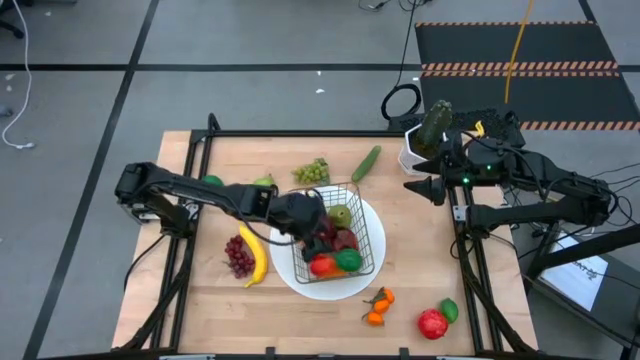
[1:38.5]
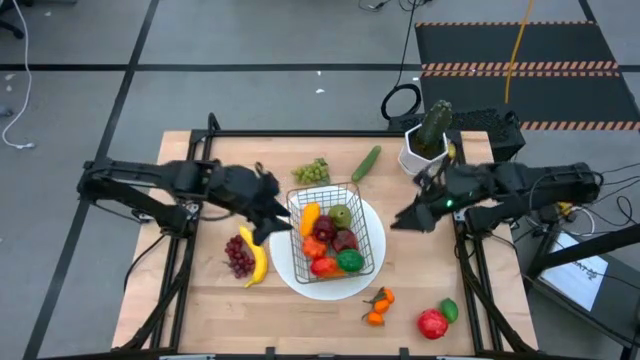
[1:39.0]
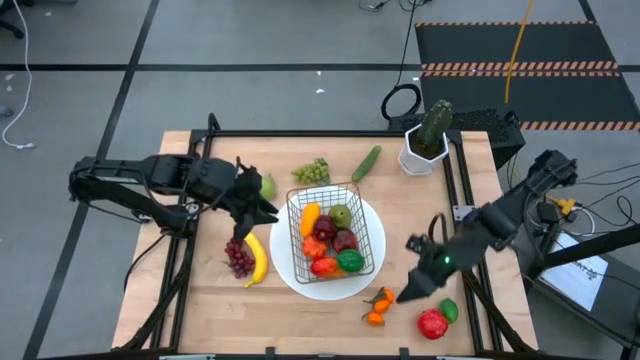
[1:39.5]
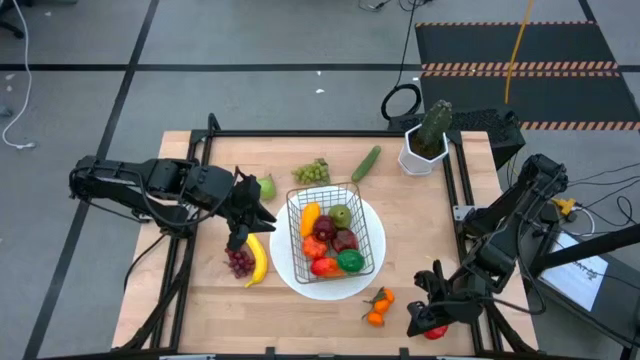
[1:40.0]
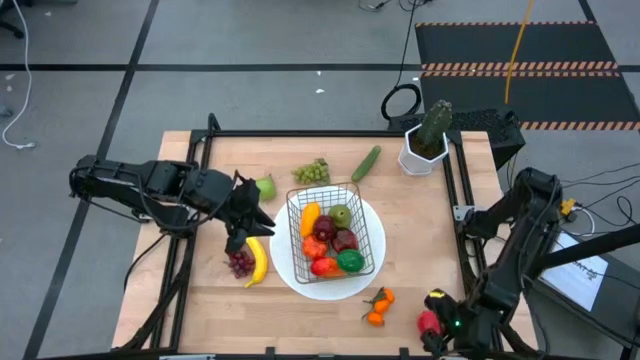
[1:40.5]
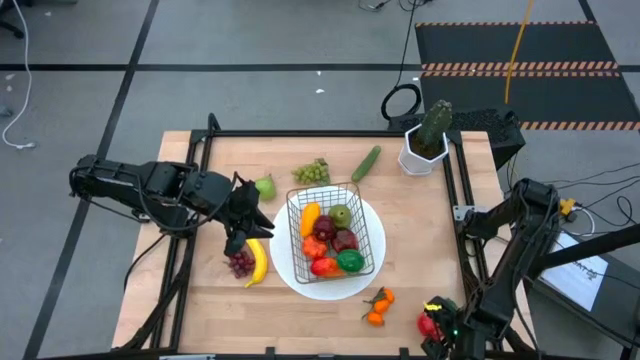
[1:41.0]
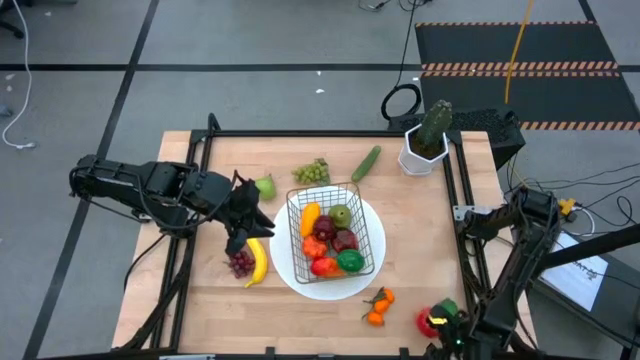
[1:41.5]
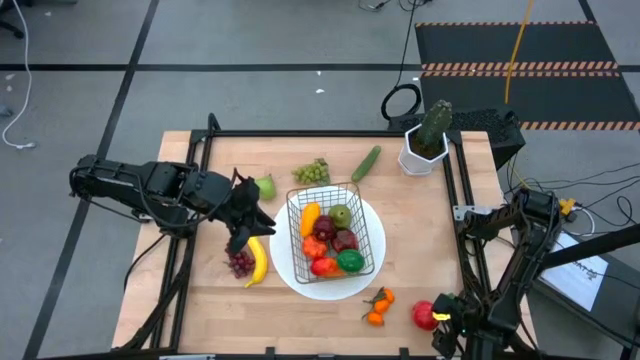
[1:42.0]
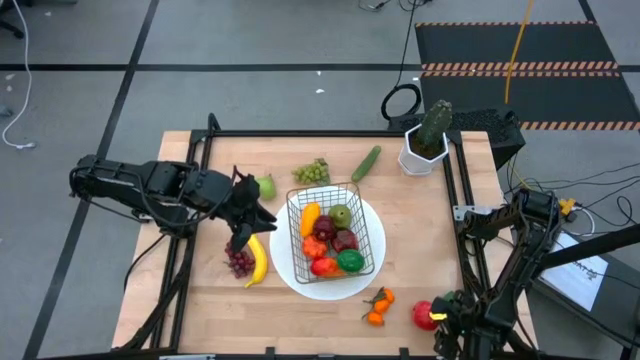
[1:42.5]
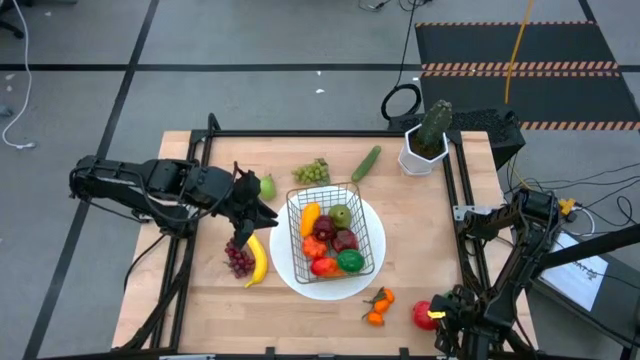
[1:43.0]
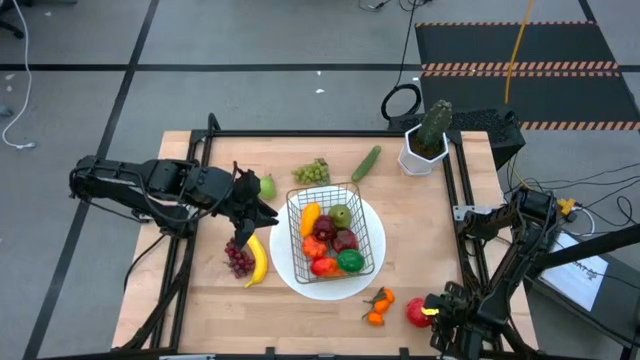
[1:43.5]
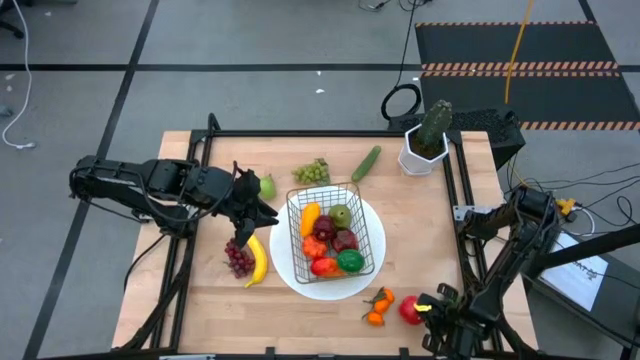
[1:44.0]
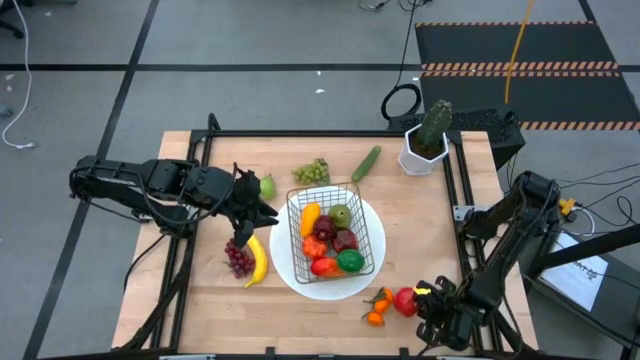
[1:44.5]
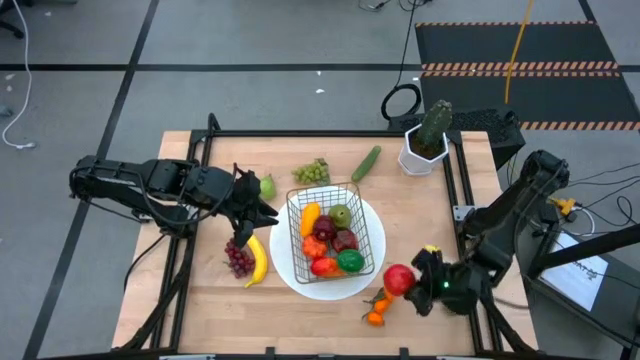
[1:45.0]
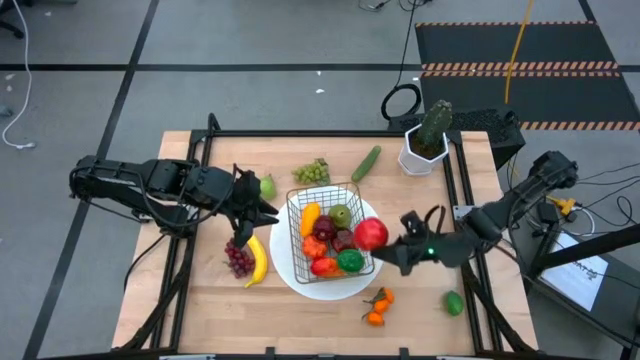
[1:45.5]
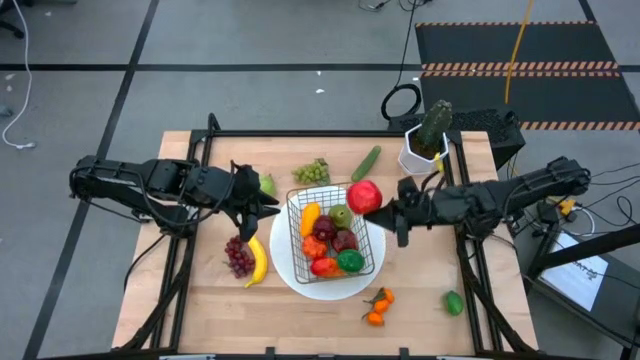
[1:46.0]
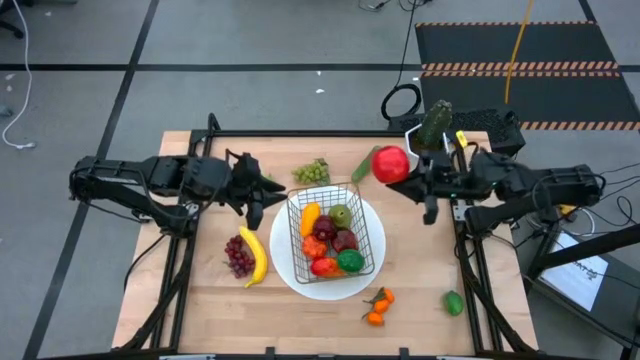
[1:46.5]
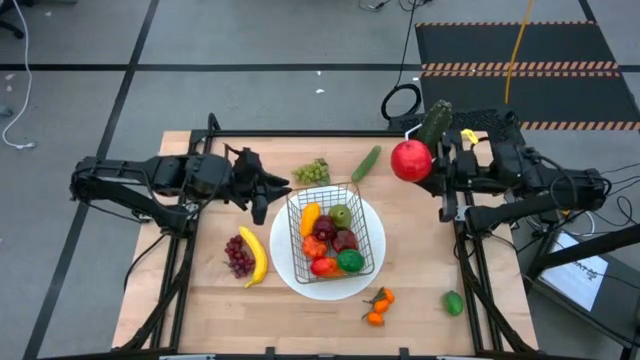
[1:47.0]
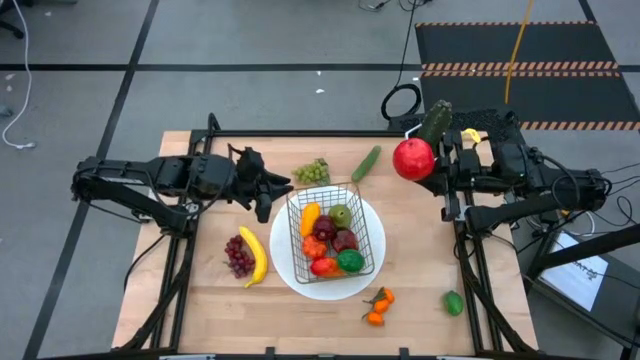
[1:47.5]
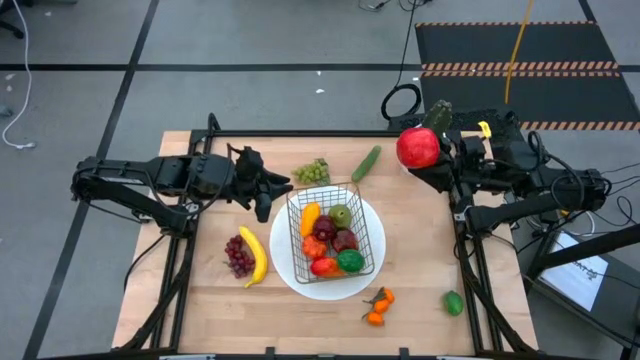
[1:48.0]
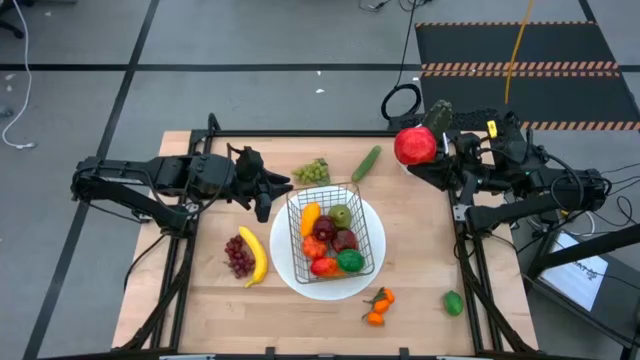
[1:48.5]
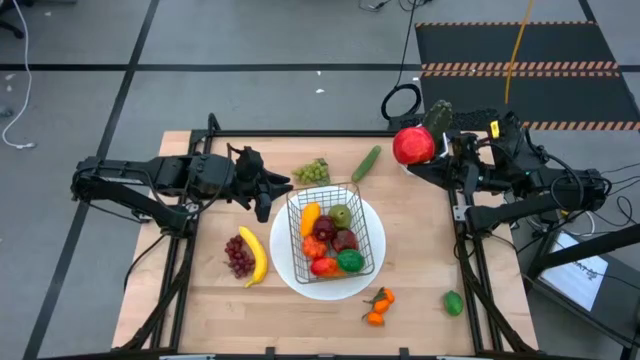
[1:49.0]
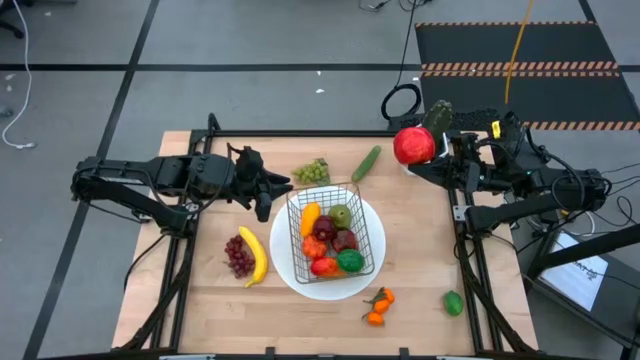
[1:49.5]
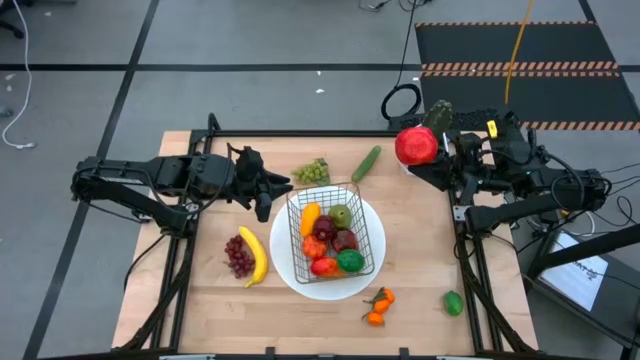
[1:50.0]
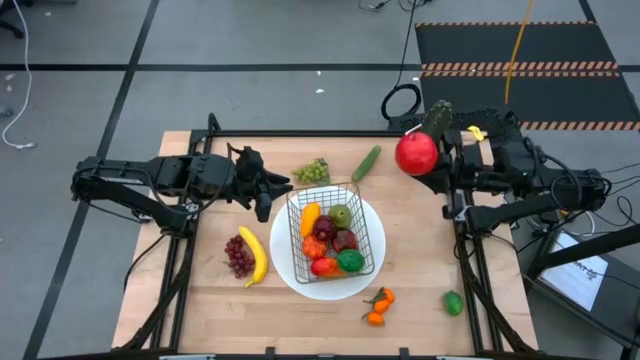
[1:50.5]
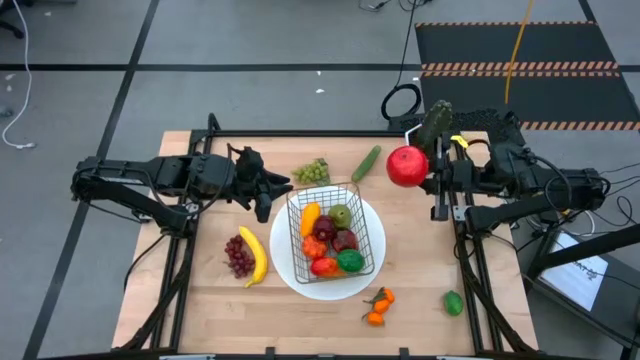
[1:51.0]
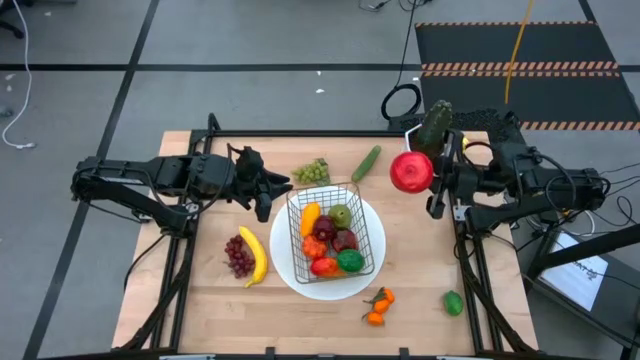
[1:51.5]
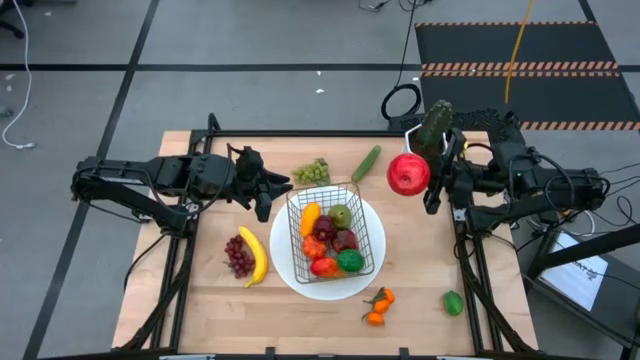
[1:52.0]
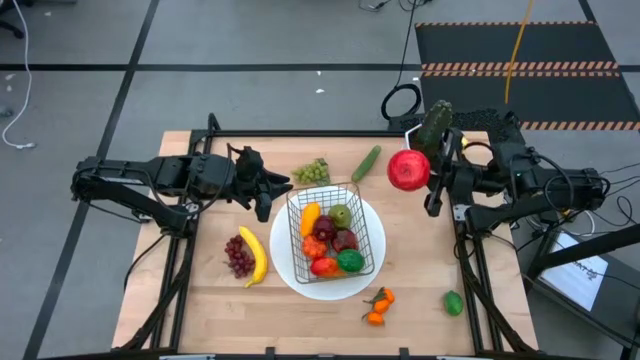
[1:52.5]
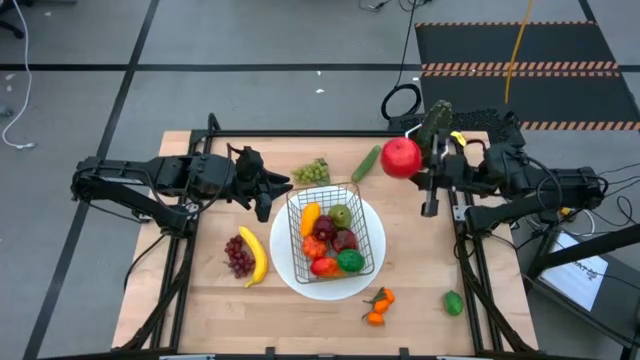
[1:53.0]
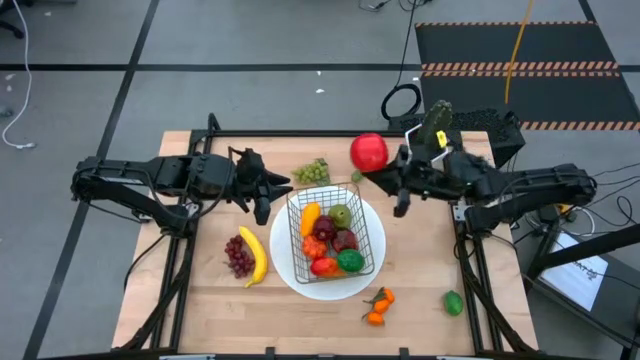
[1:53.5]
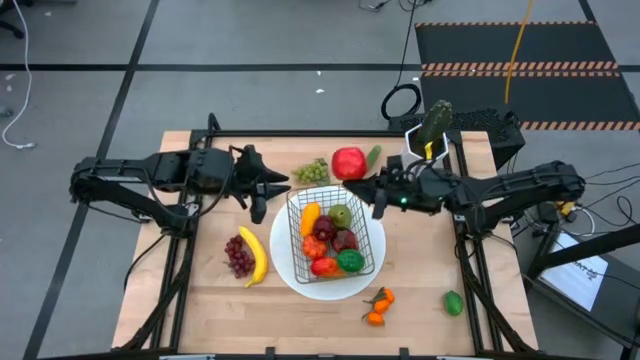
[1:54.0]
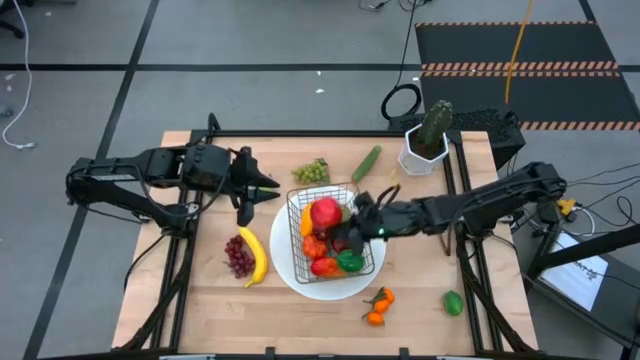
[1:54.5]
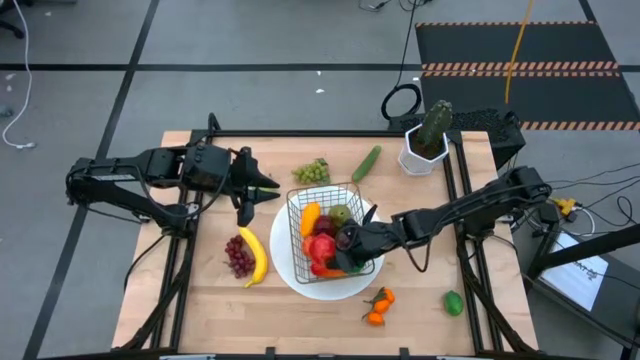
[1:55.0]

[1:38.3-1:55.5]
Task: Build produce basket
Put the red apple into the black wire basket

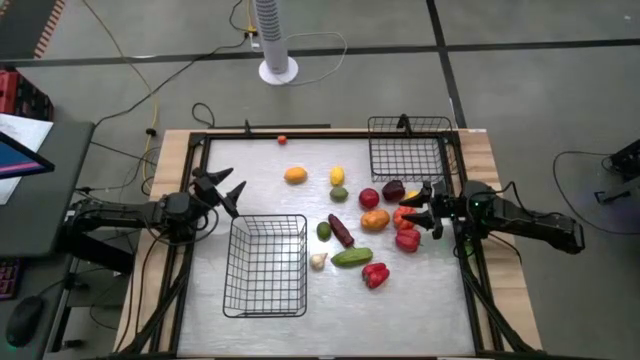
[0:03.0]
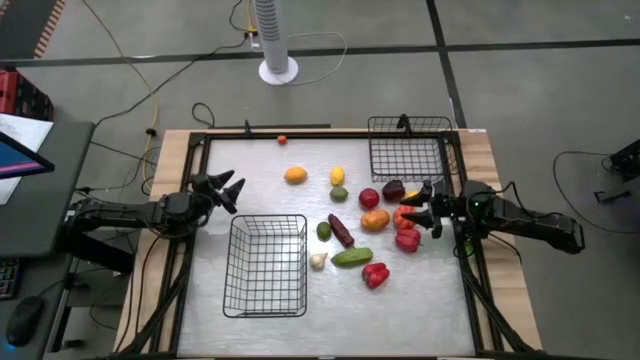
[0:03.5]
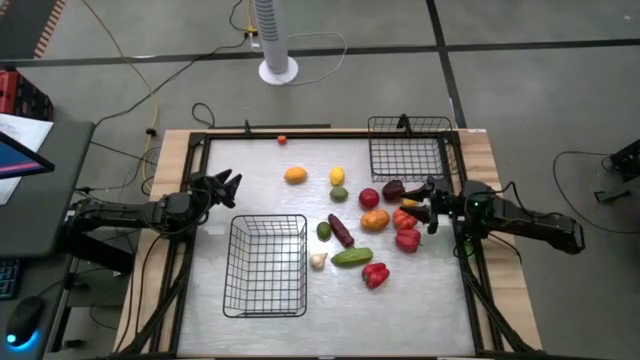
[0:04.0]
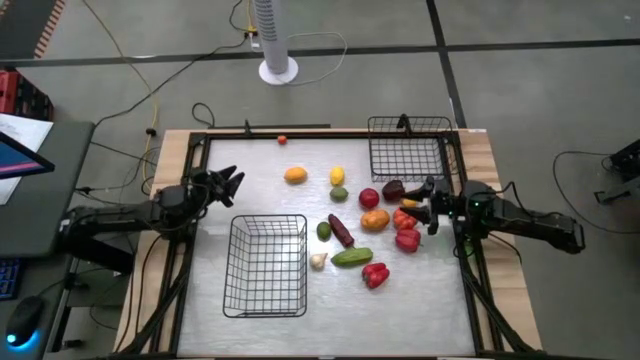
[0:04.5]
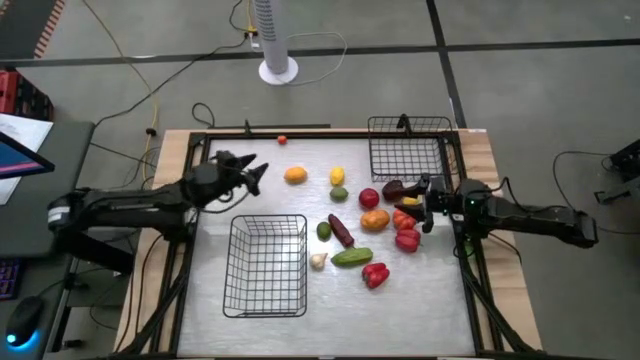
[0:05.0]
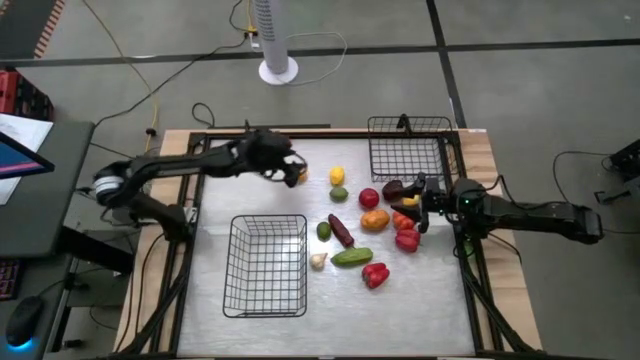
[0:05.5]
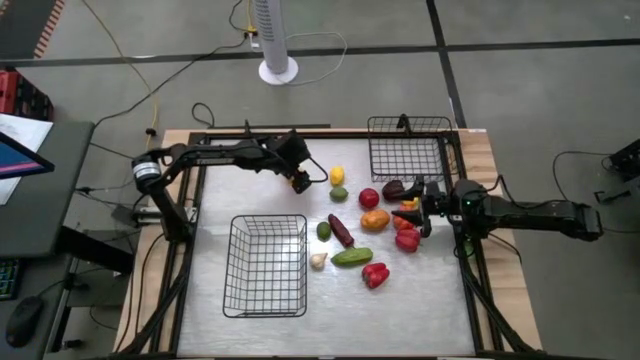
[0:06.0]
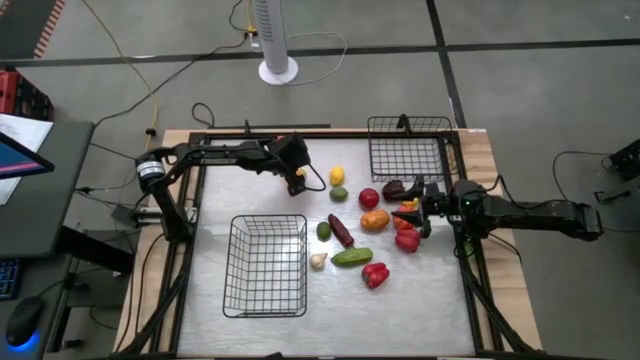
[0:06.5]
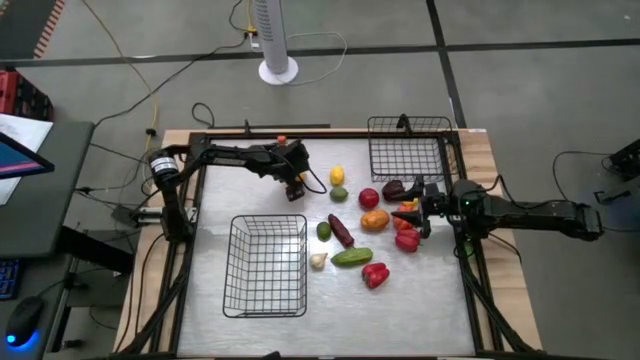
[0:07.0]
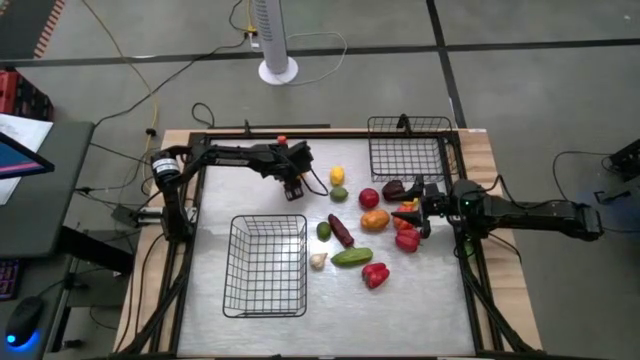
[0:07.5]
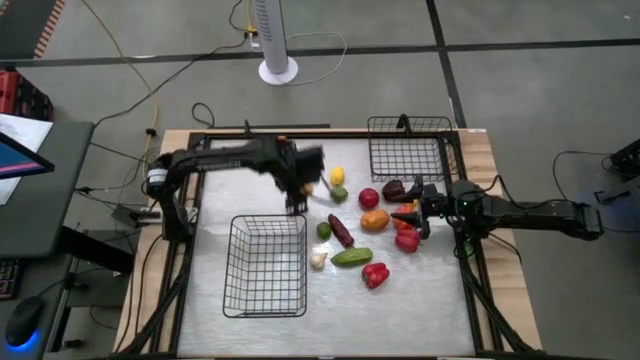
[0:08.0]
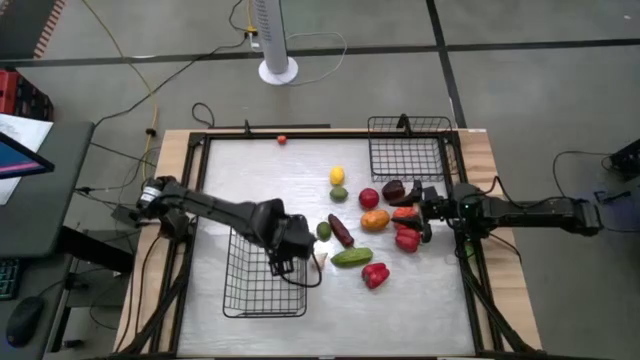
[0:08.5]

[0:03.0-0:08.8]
Task: Sort produce into baskets
Put the lemon into the bottom wire basket
